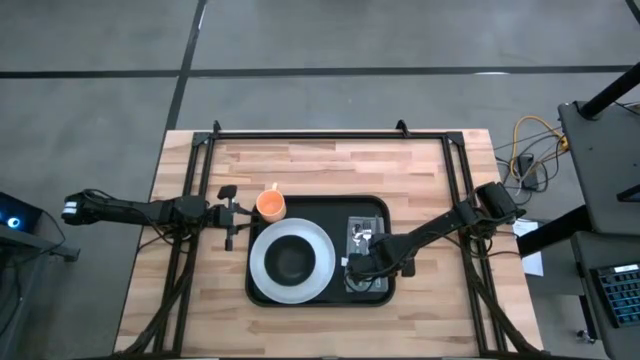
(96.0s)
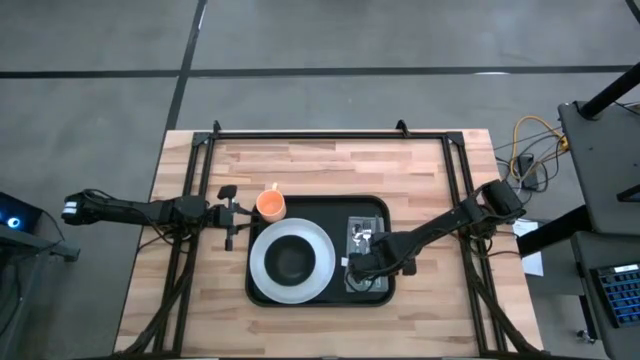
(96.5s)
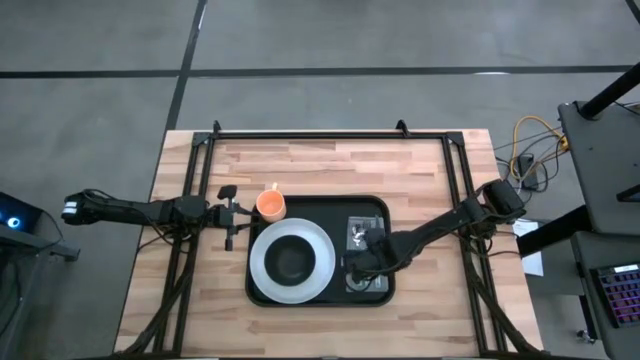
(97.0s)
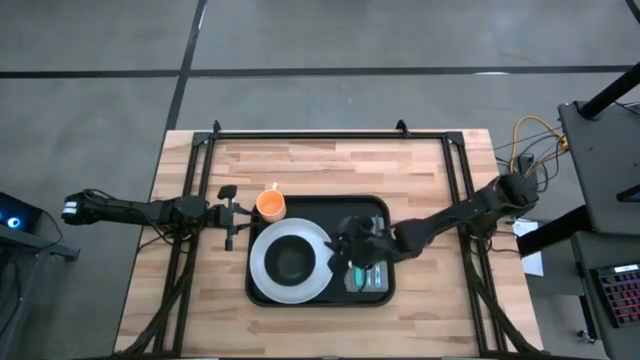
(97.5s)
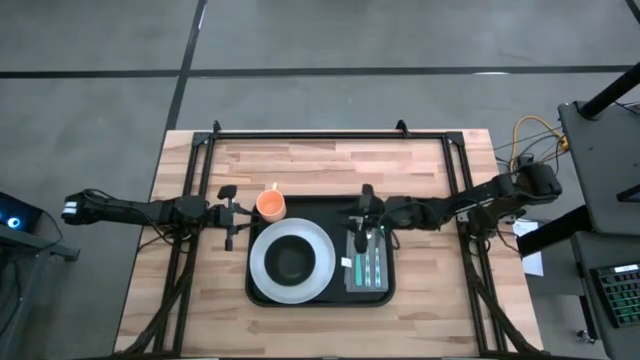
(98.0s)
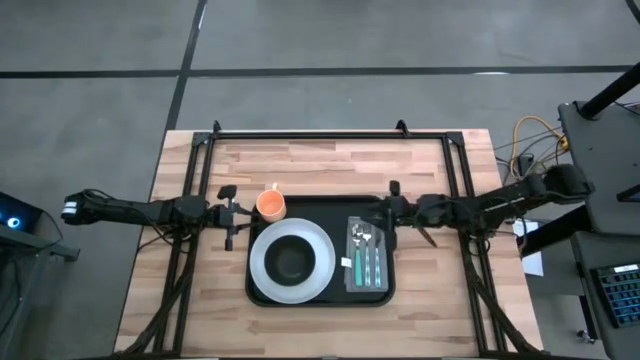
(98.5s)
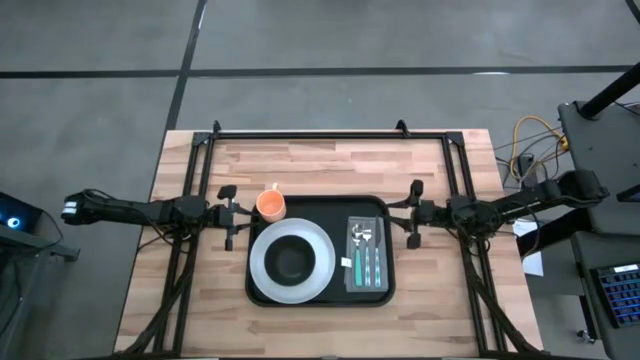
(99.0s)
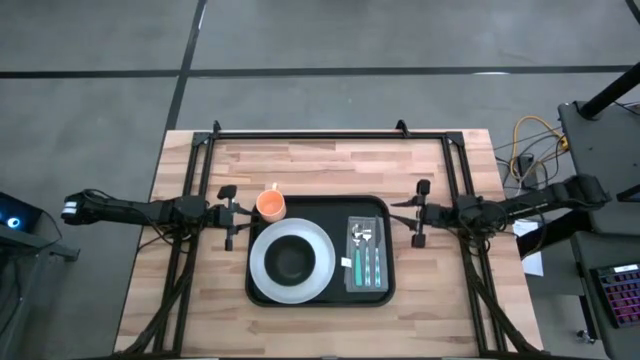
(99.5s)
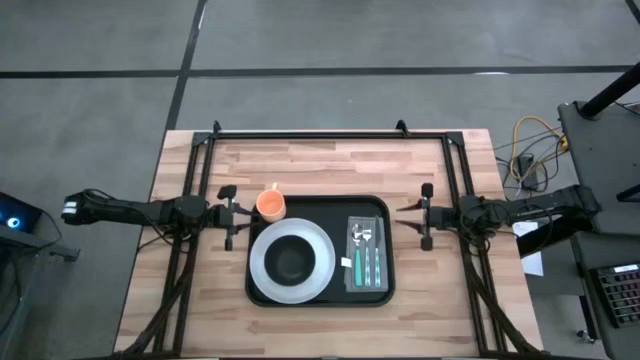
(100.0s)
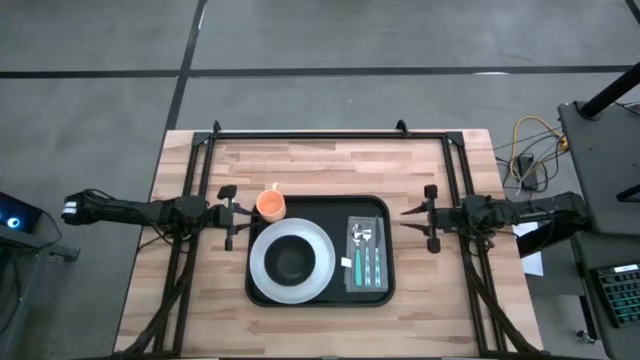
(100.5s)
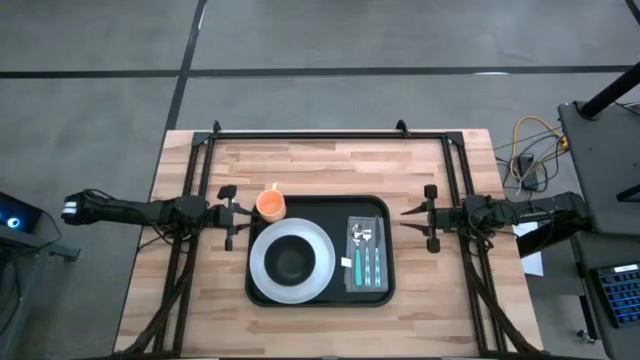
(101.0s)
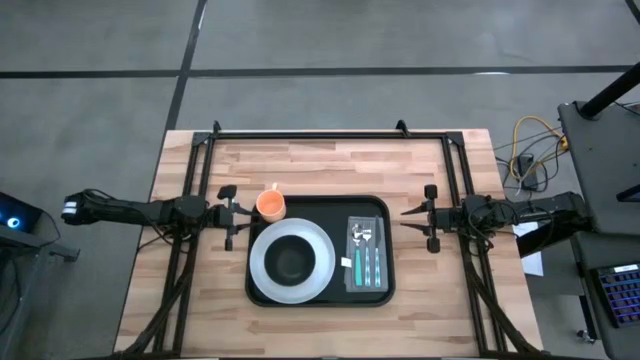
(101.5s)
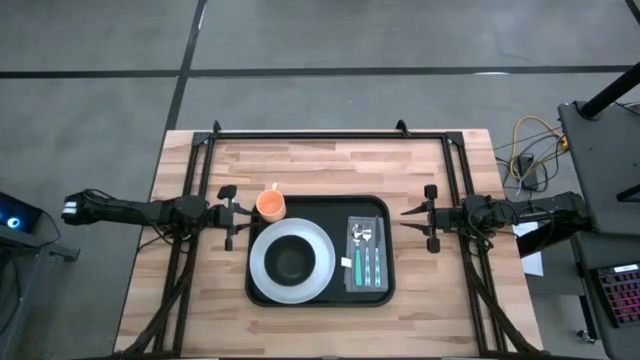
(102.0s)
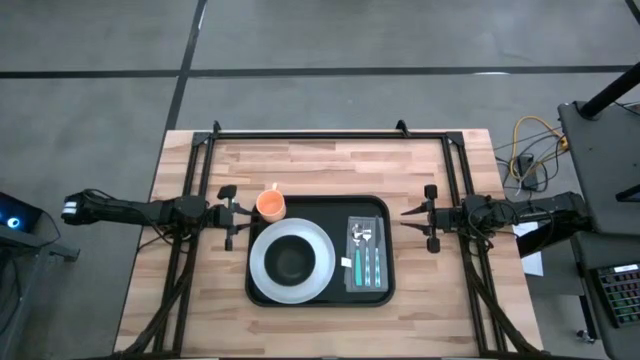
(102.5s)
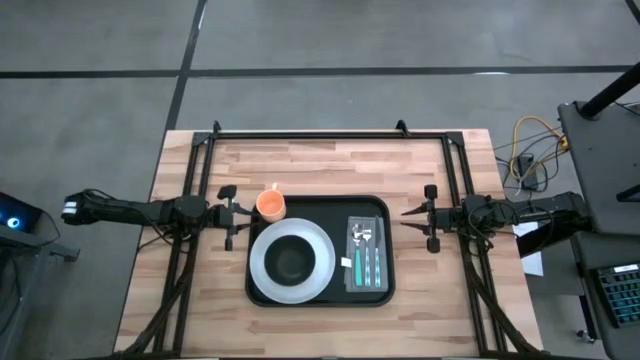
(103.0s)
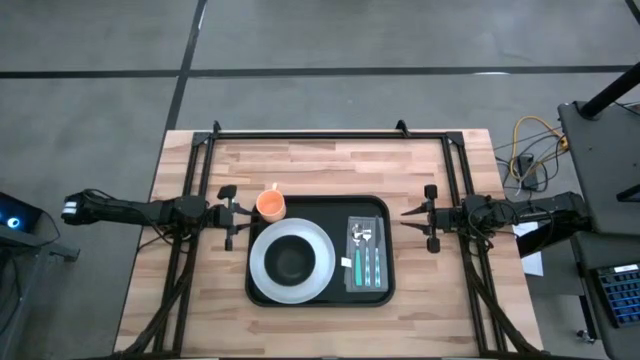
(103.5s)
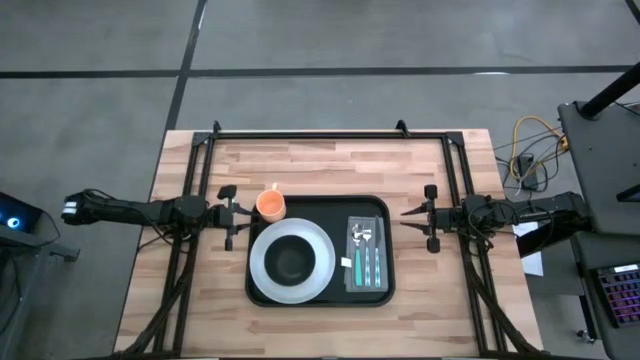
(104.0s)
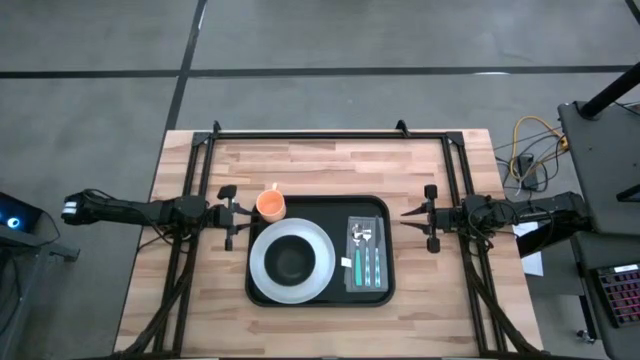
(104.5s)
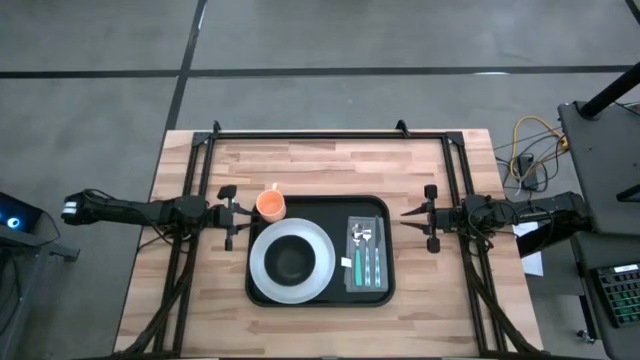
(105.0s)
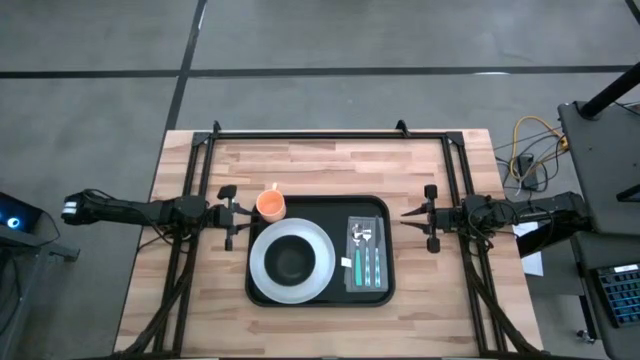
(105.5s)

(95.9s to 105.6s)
Task: Set up tray
Return to Home Position

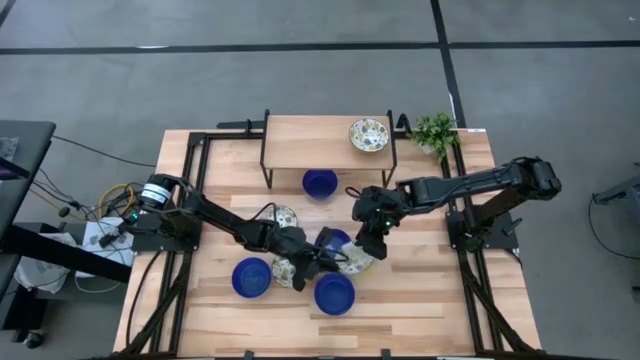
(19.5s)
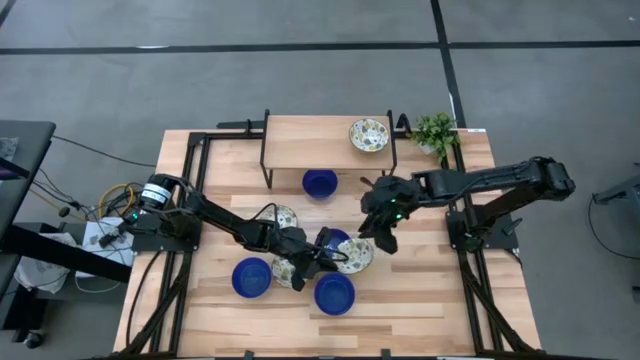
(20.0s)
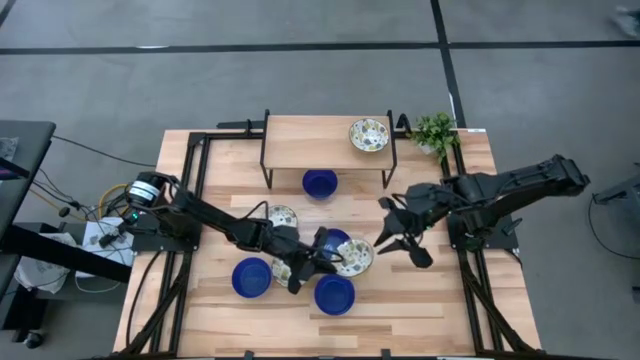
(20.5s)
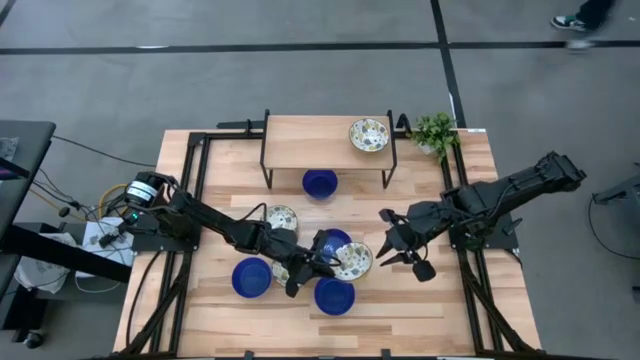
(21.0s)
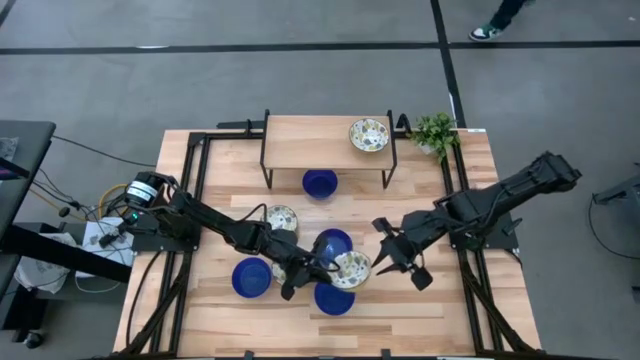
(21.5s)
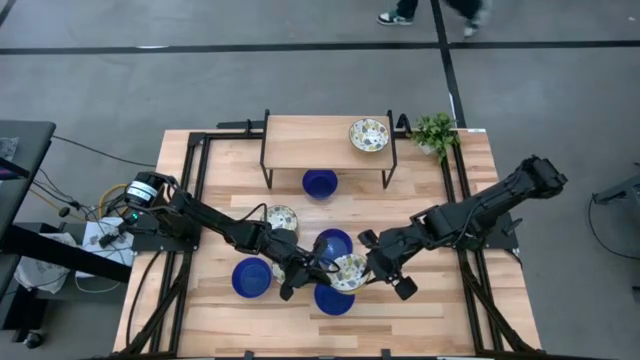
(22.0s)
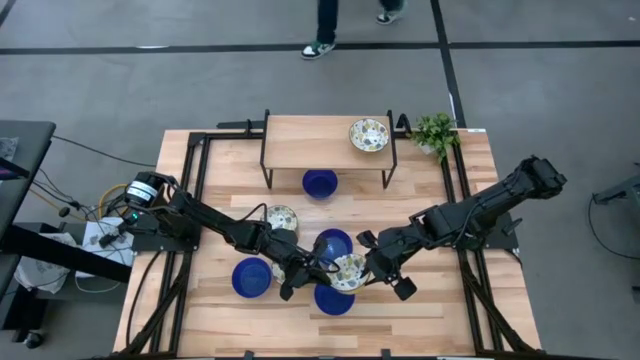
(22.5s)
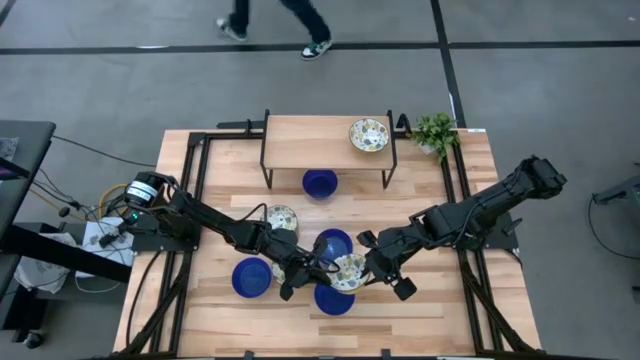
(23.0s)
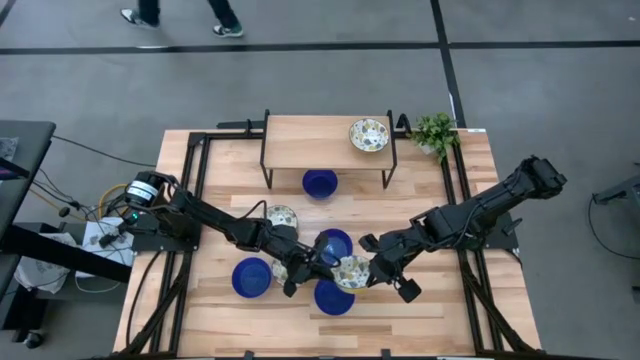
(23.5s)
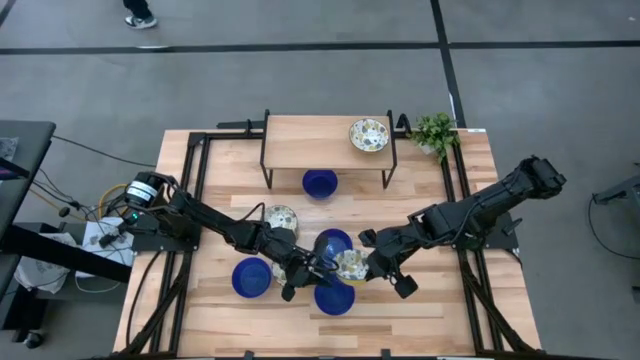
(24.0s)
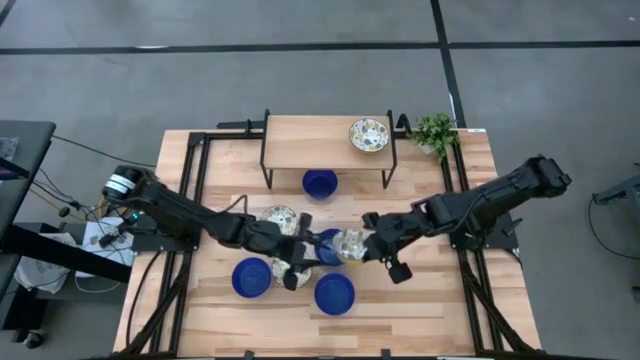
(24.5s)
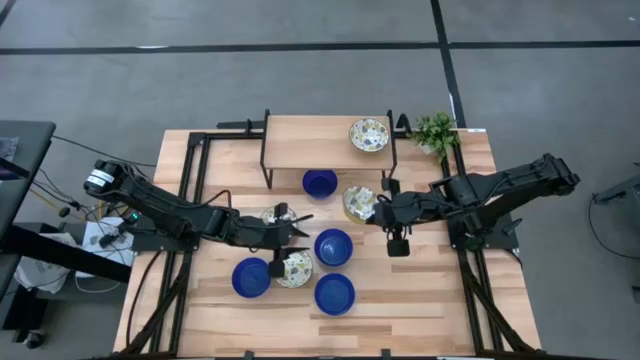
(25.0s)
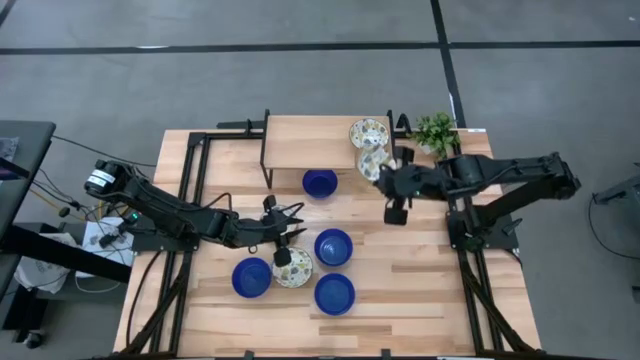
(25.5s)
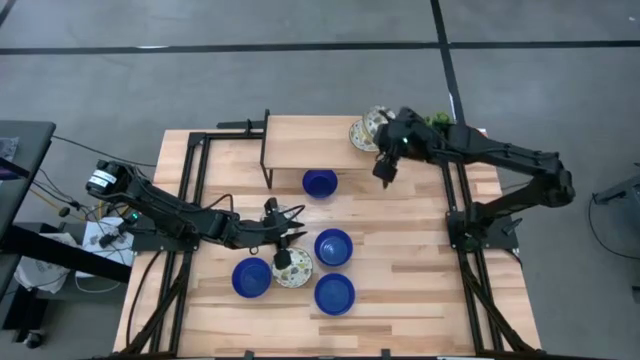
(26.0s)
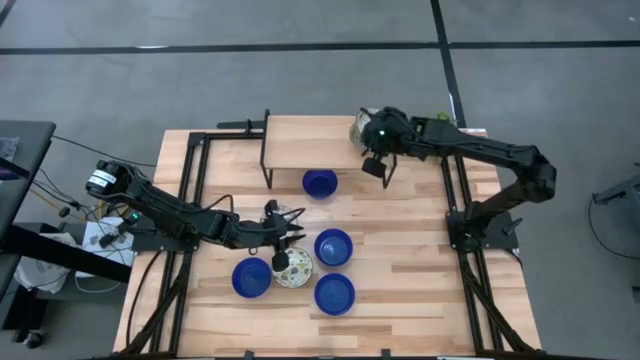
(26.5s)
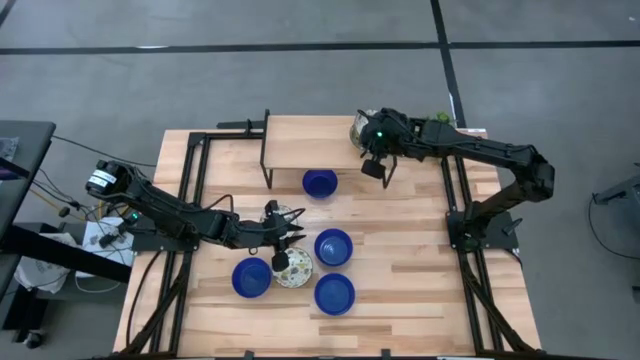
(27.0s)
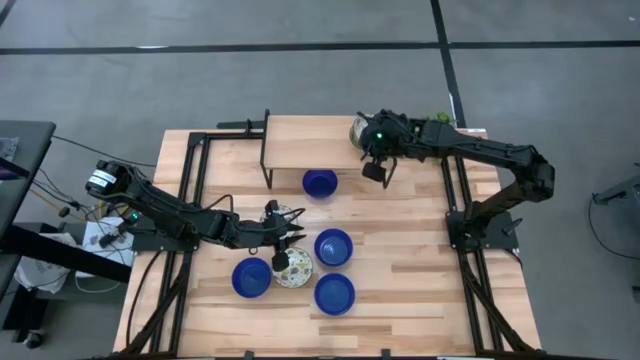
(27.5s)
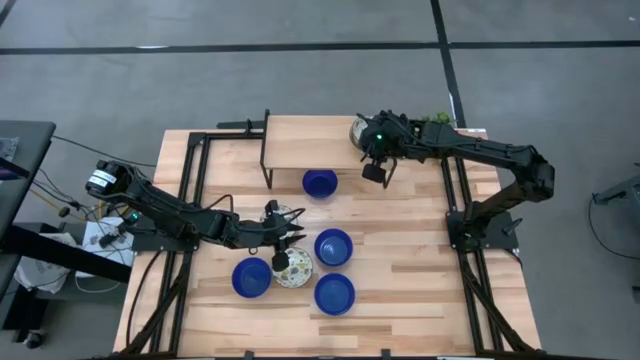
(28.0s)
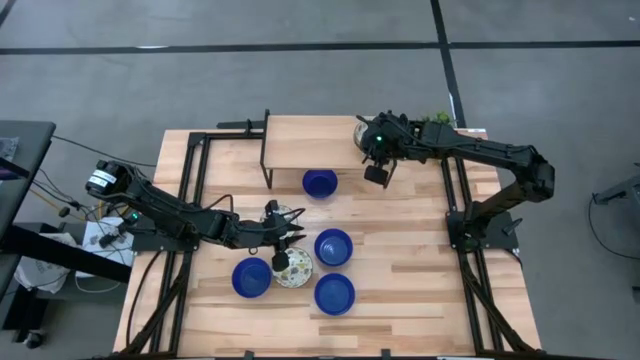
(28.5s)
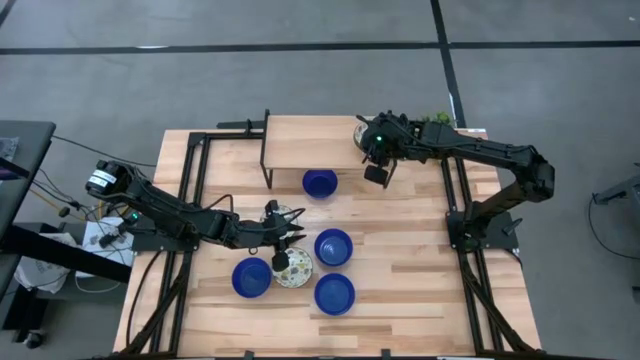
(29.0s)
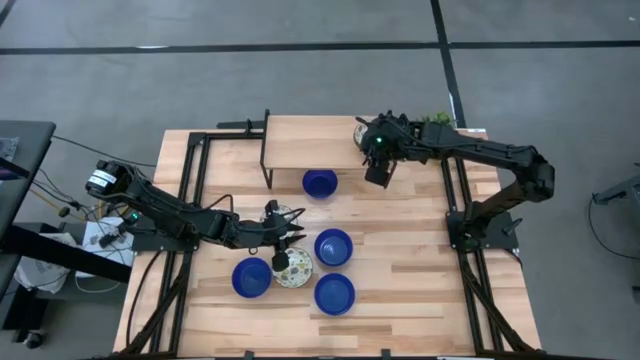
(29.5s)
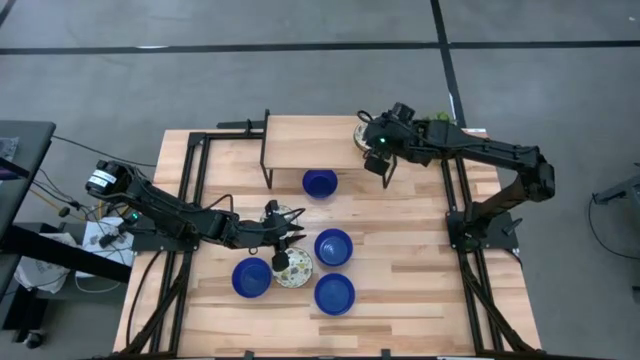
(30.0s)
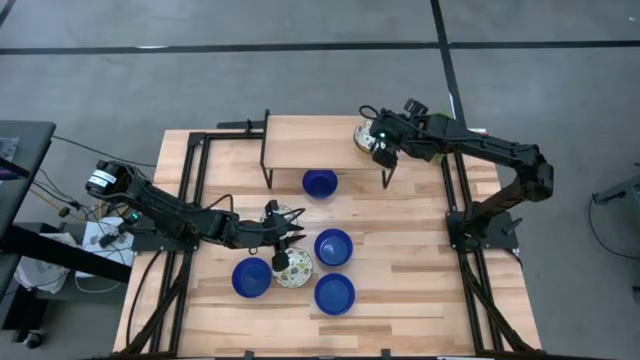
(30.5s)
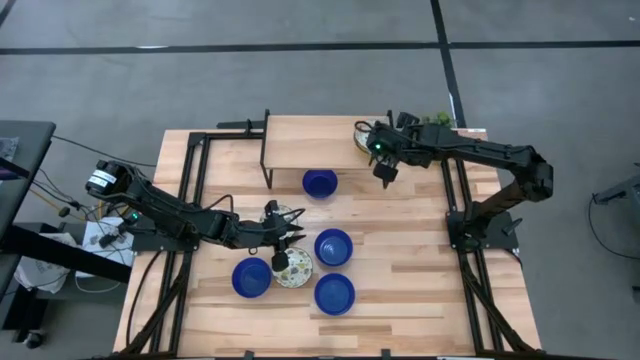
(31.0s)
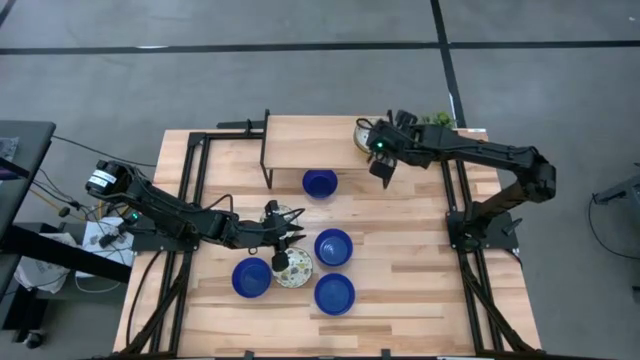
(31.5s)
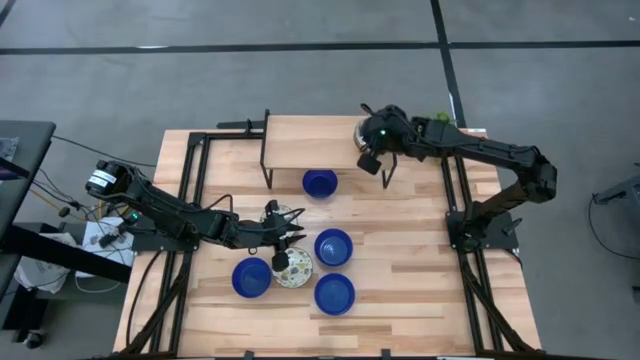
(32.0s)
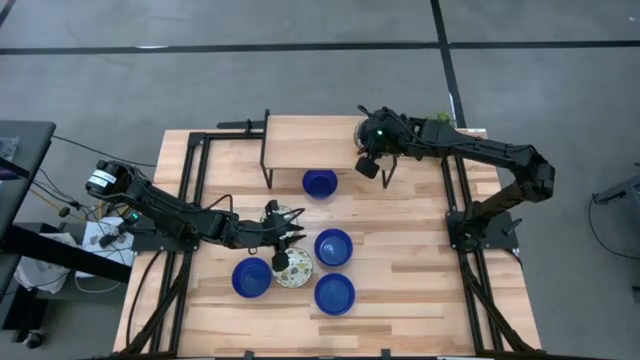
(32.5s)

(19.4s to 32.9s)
Task: Pick & Place Mini bowls
Stack the white patterned bowl on the white patterned bowl on the shelf
